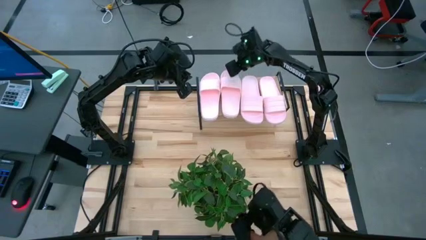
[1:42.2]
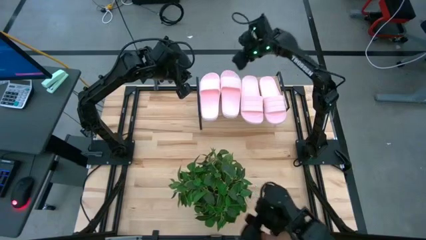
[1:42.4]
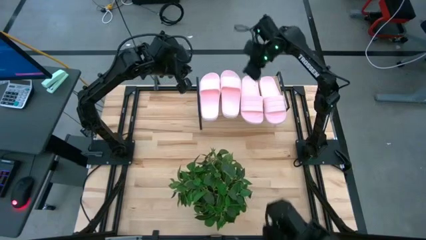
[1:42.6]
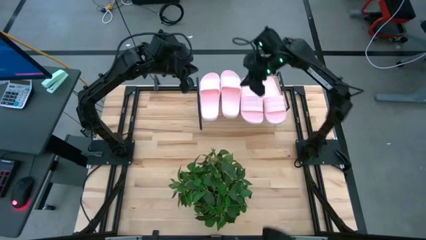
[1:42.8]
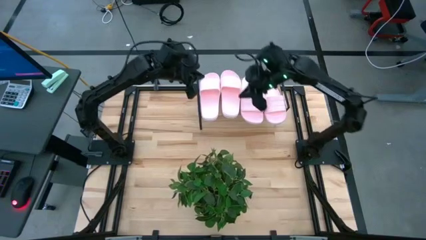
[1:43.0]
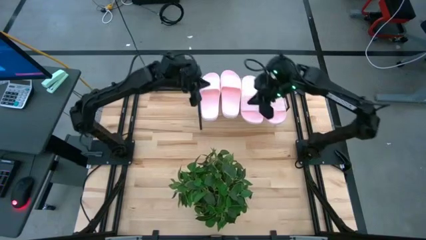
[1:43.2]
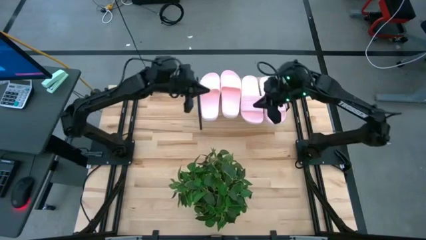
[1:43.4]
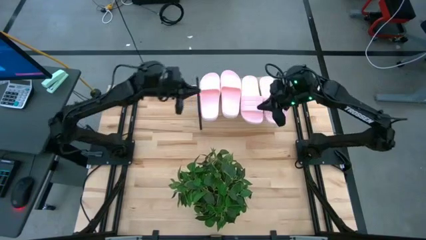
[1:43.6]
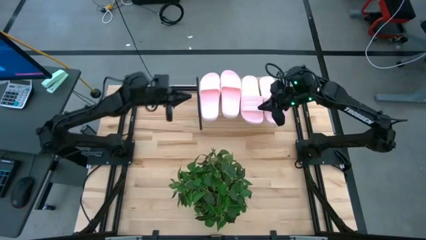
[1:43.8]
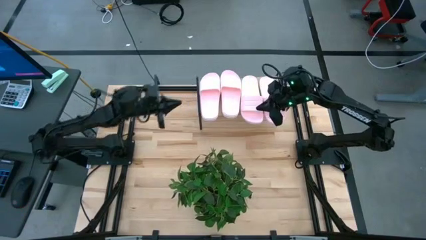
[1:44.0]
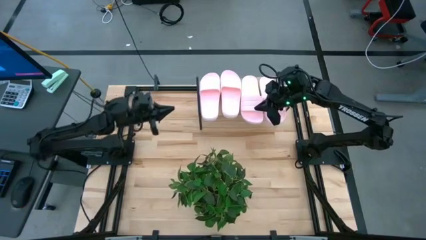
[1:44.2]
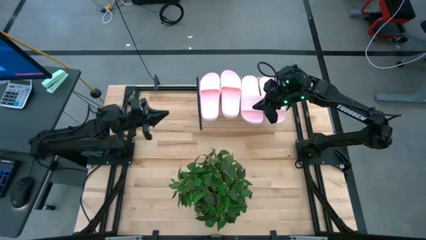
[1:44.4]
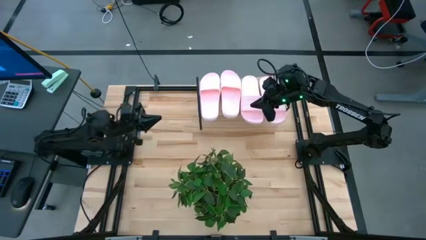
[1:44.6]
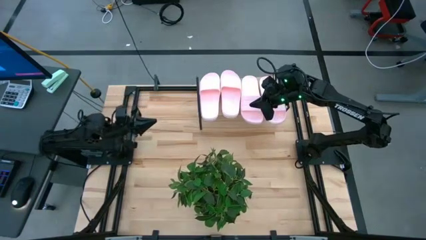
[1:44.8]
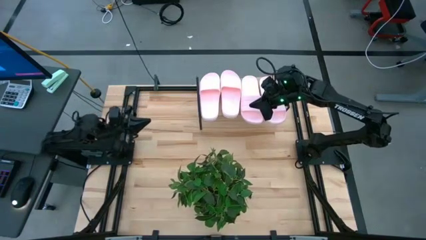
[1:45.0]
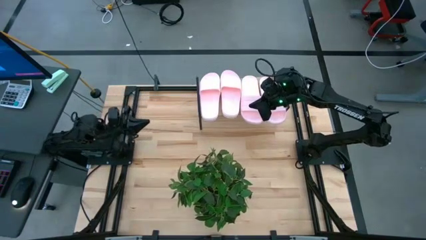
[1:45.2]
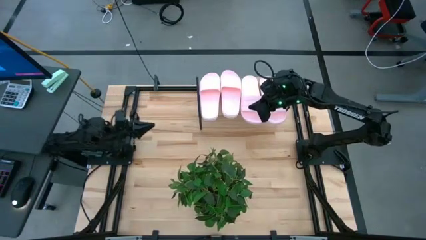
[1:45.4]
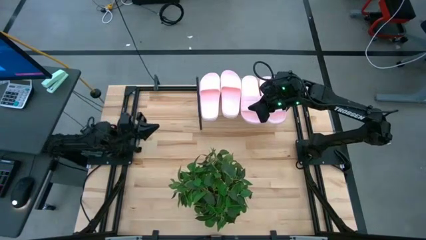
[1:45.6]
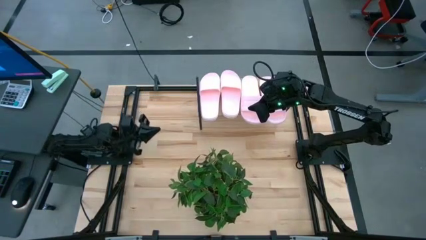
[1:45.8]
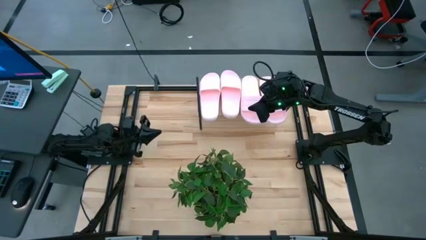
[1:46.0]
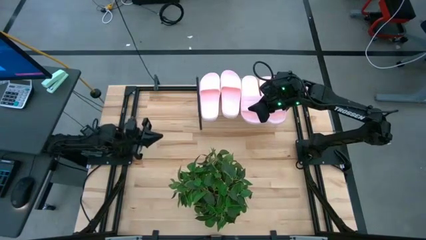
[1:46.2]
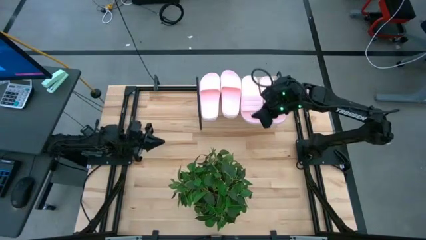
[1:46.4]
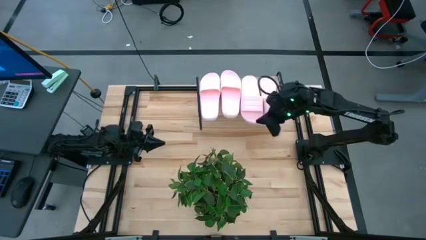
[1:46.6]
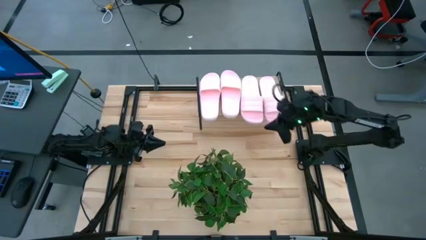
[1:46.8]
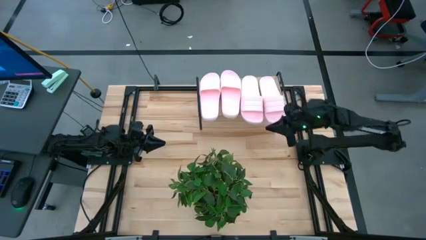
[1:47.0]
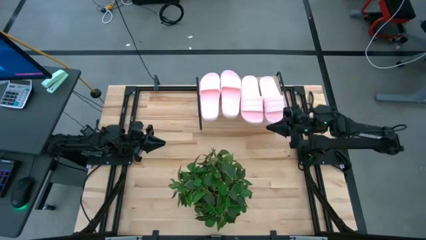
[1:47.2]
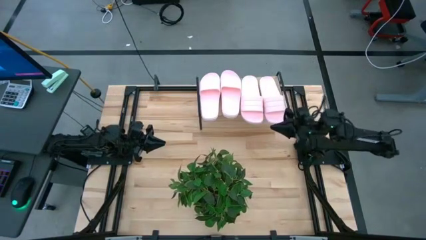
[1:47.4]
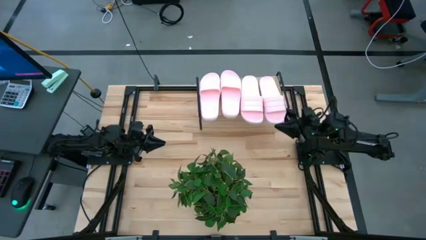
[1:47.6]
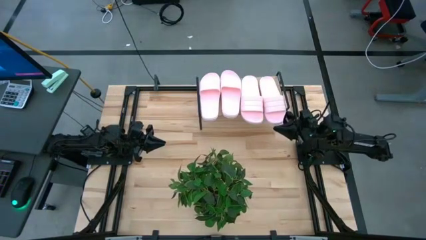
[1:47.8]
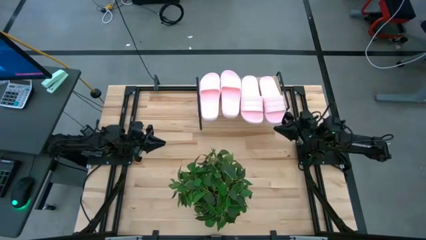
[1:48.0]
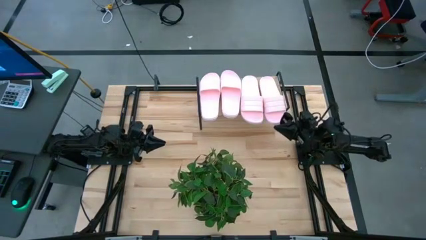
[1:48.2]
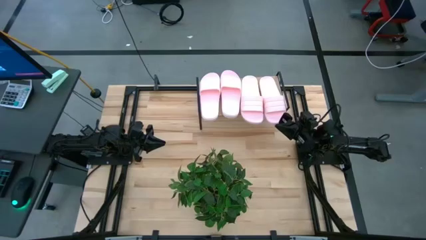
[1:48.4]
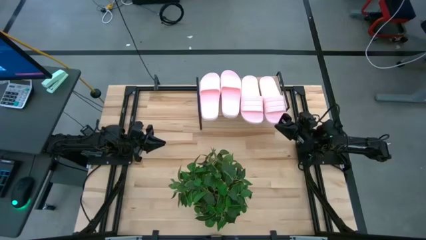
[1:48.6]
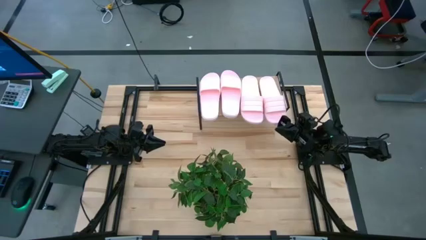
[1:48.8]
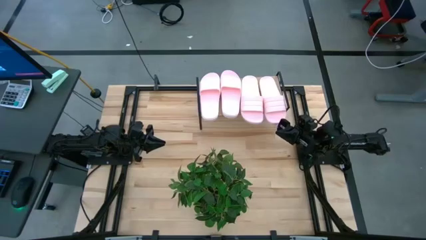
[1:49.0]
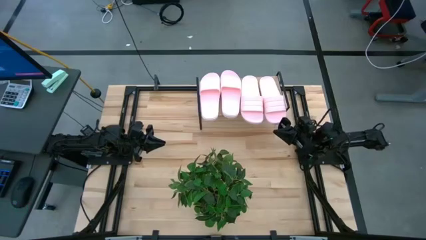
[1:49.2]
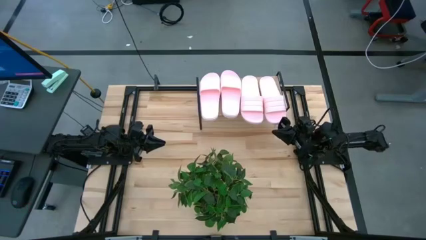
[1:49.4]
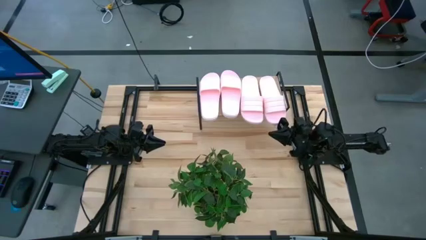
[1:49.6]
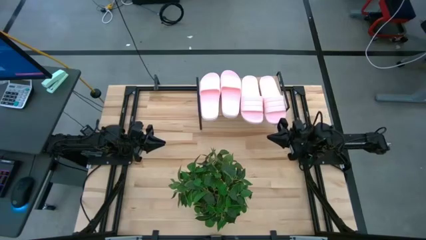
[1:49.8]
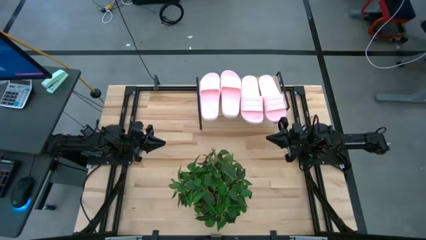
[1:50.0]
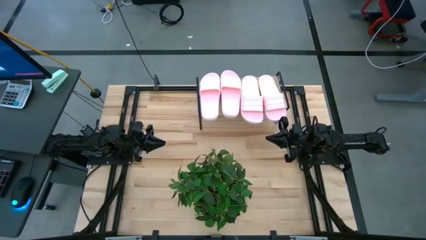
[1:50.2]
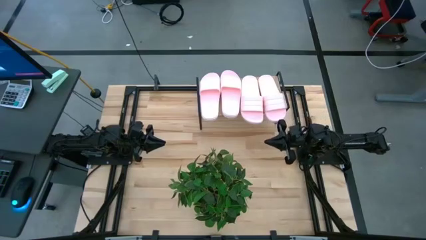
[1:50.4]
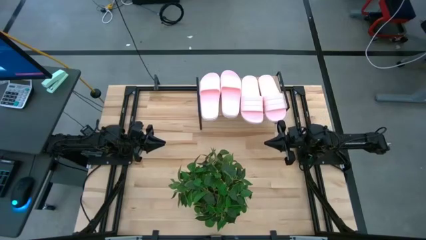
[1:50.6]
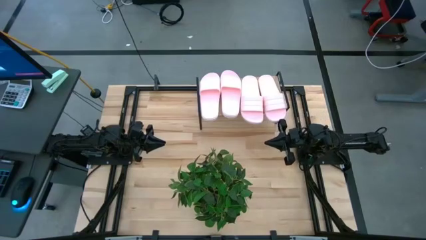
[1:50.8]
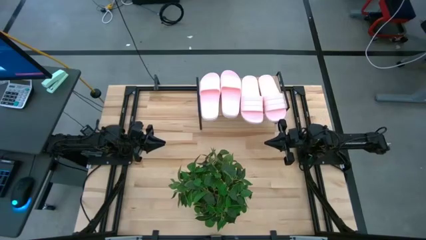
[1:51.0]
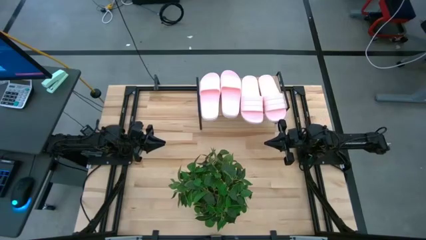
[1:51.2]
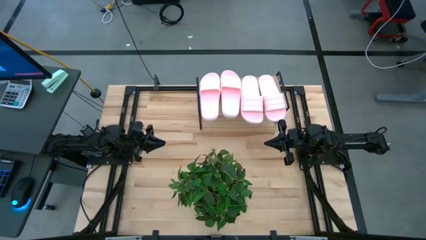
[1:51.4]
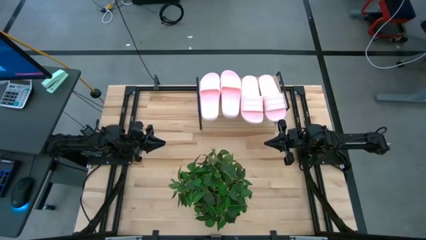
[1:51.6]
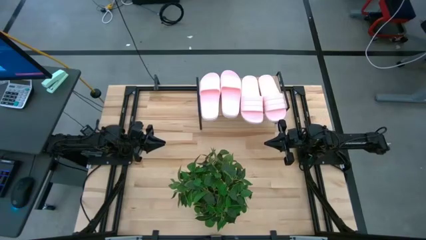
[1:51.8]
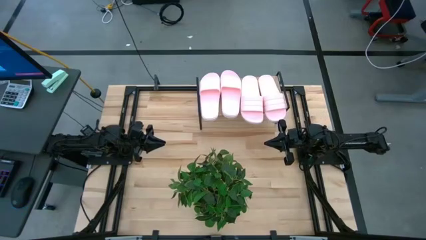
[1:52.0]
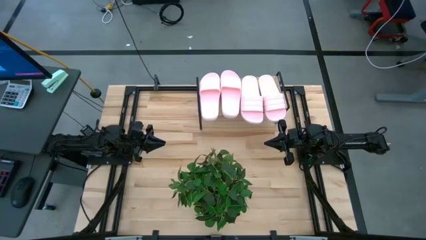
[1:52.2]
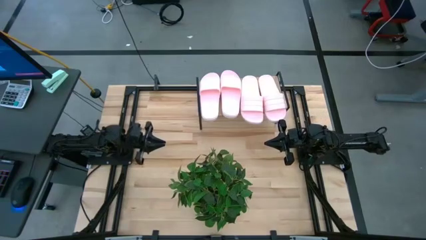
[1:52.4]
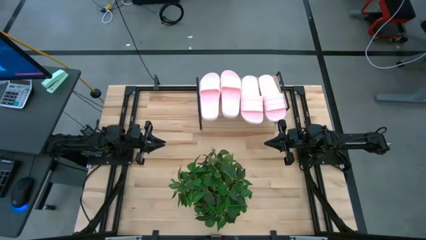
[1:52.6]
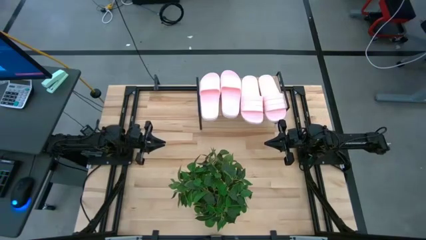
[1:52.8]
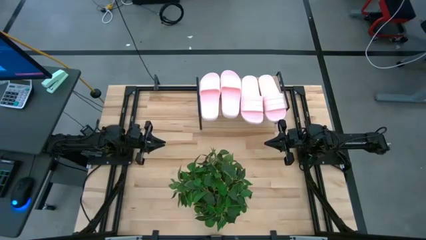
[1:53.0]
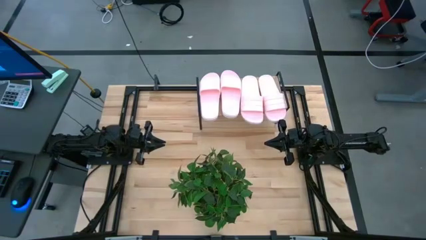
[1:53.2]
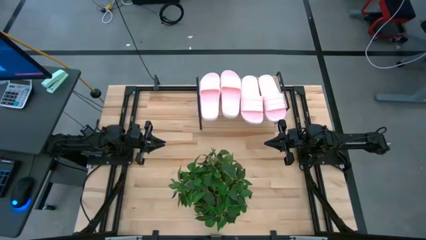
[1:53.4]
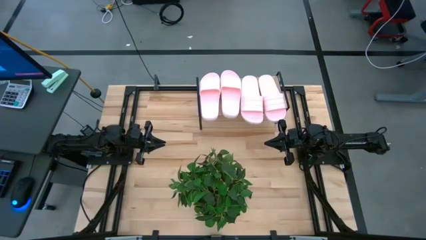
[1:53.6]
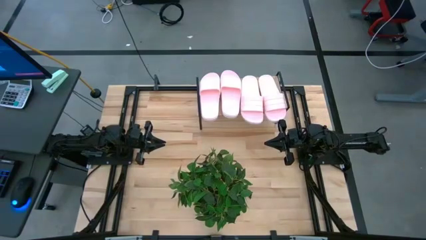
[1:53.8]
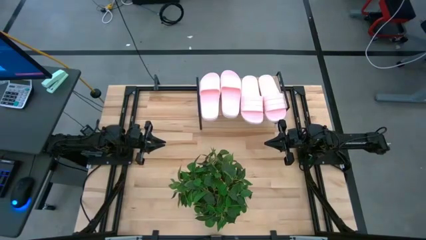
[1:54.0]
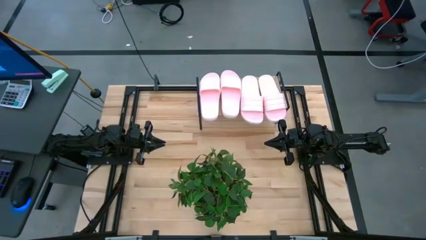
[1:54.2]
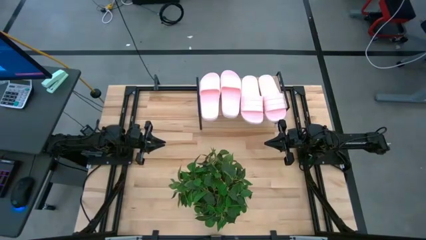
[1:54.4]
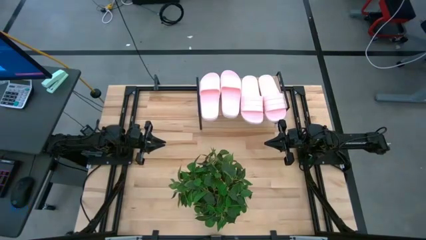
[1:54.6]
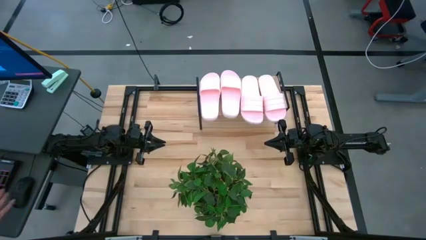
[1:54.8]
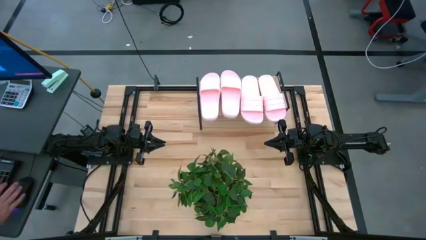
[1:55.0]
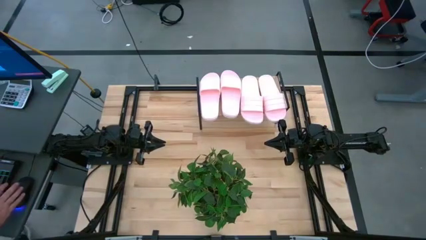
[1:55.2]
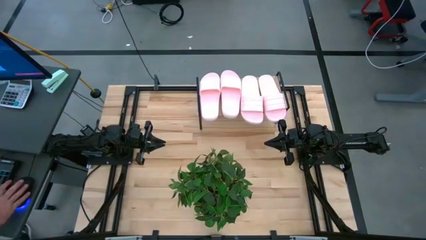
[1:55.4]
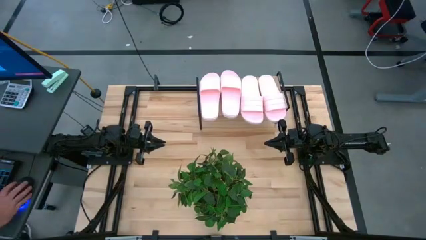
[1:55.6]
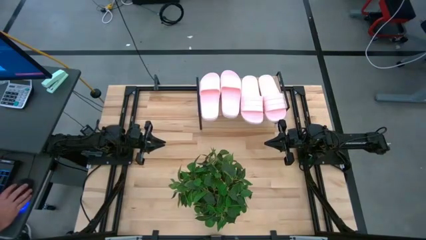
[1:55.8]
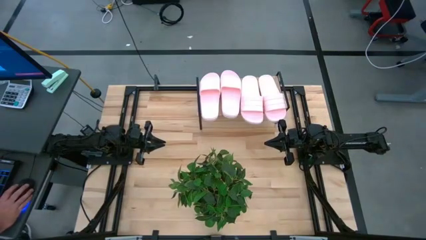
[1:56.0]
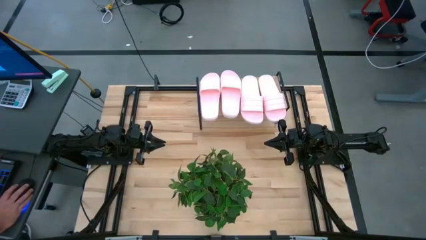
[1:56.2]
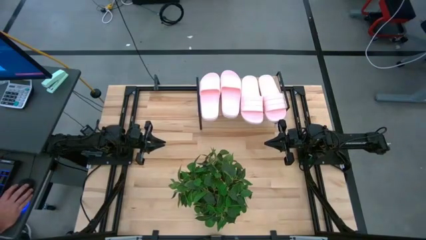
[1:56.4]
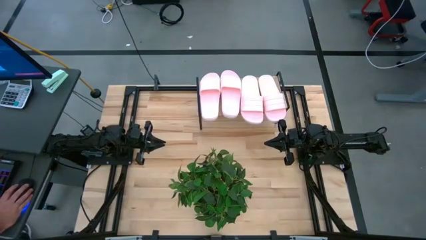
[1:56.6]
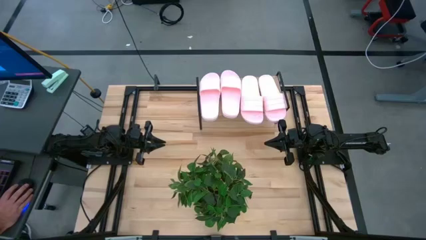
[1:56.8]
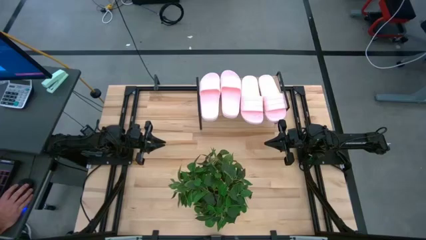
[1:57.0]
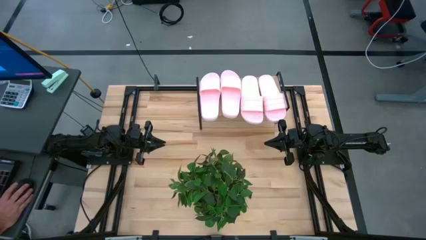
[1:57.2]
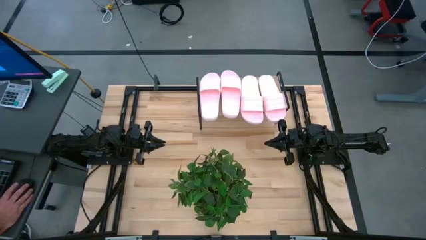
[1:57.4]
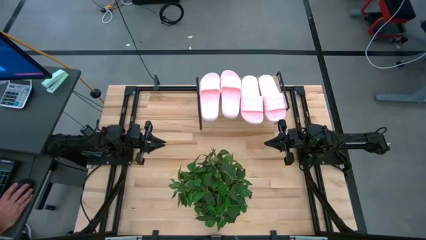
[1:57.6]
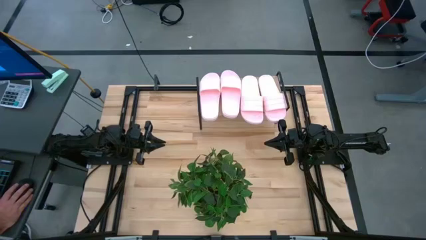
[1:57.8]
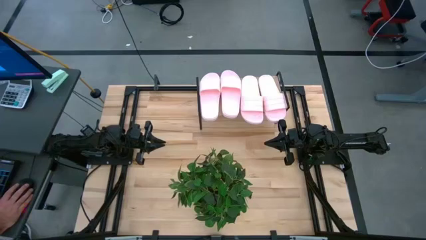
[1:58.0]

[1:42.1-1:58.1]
Task: Pick and place slides into the shelf
Return to Home Position

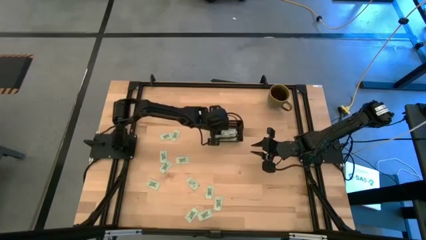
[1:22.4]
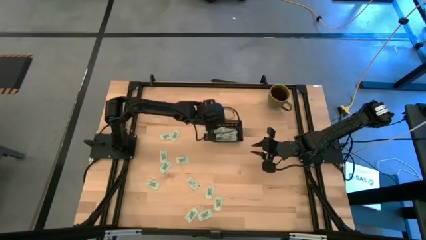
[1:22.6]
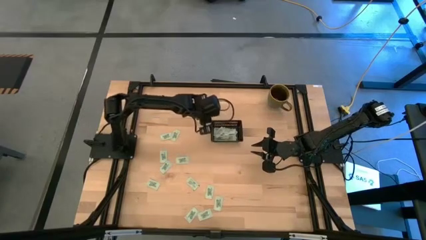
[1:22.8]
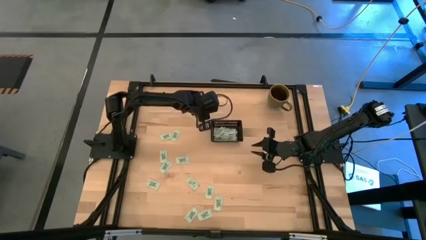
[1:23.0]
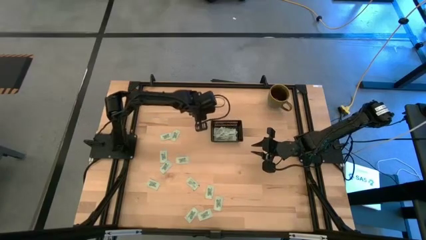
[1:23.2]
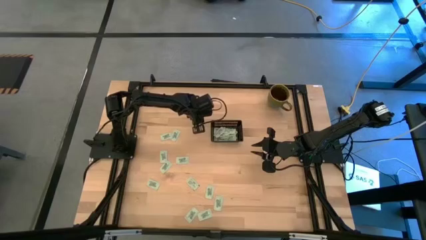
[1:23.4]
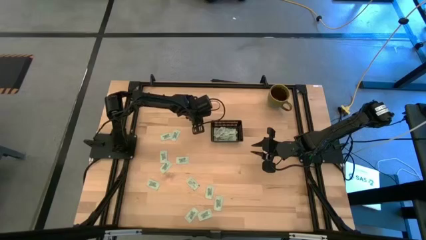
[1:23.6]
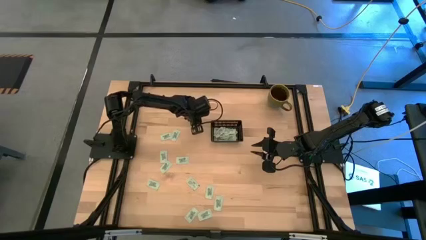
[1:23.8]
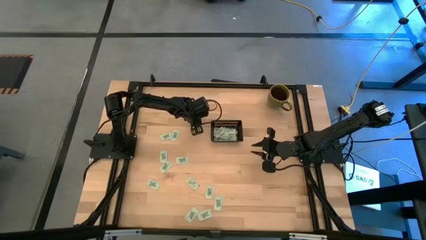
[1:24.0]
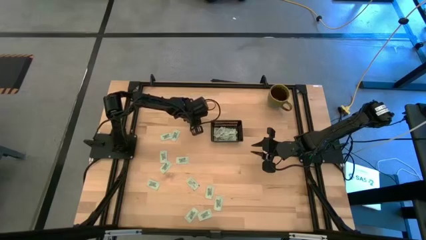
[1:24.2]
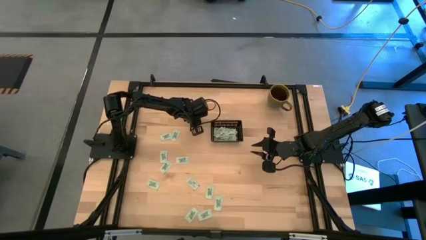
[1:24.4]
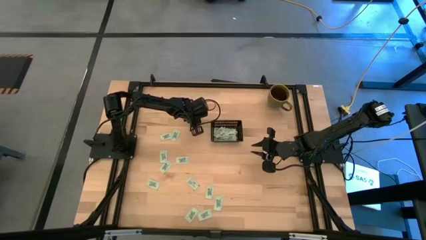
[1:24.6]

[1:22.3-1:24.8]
Task: Pick and place Stevia / Truvia into bins
Put the stevia packet into the black basket
